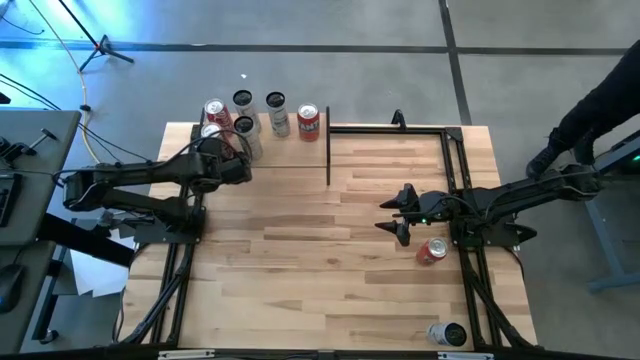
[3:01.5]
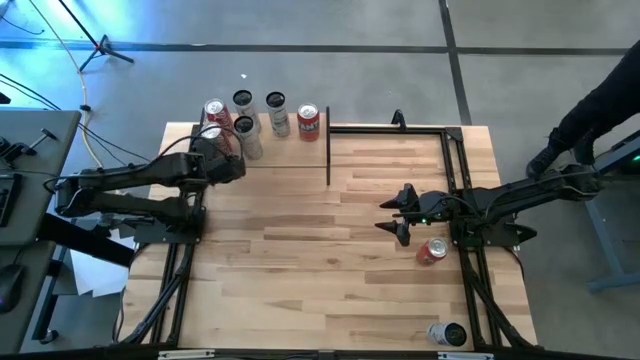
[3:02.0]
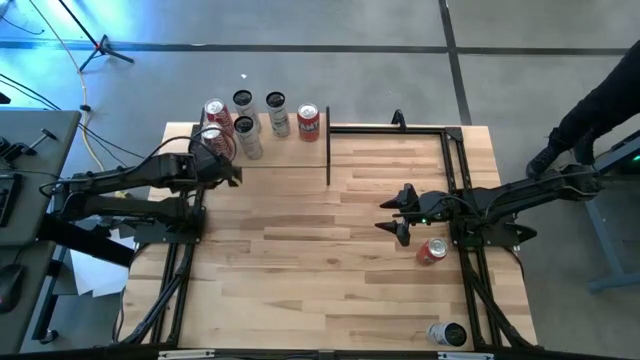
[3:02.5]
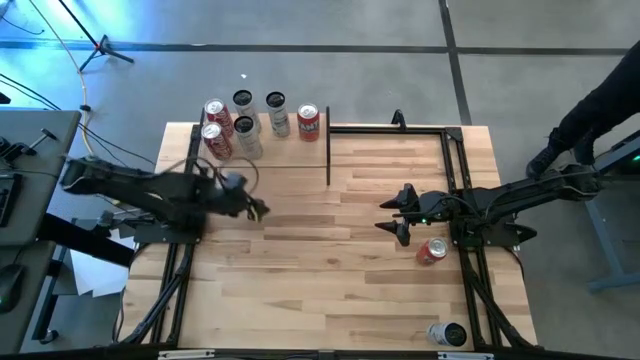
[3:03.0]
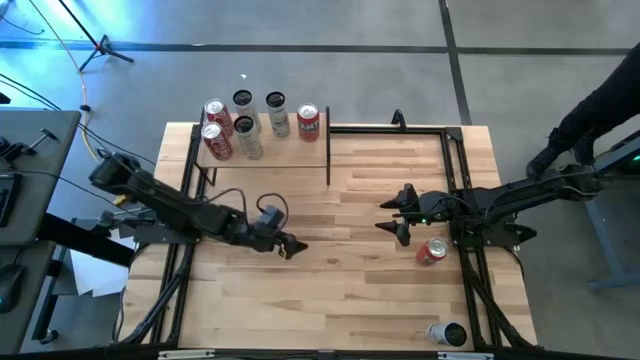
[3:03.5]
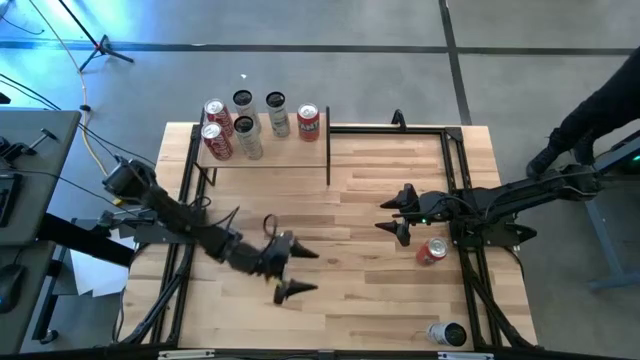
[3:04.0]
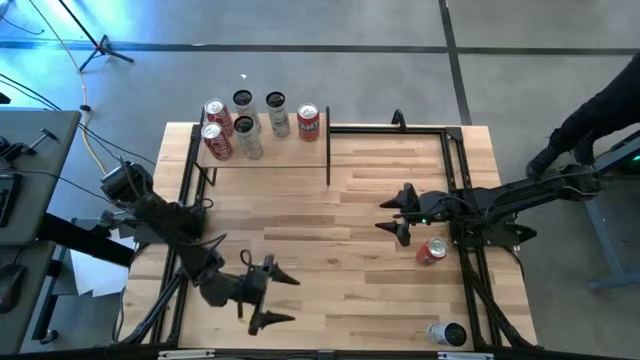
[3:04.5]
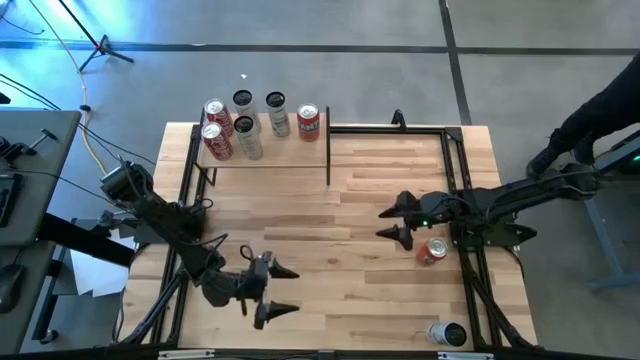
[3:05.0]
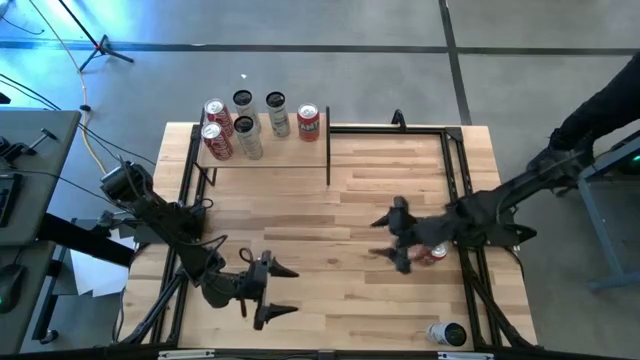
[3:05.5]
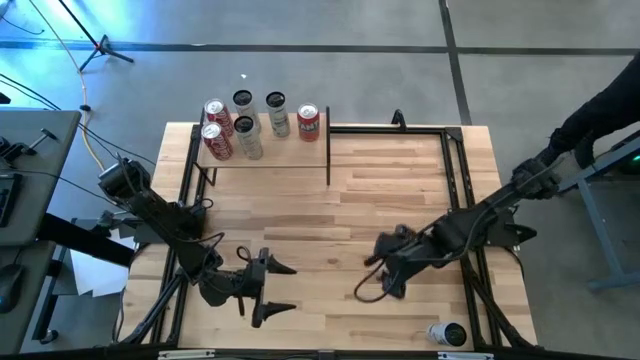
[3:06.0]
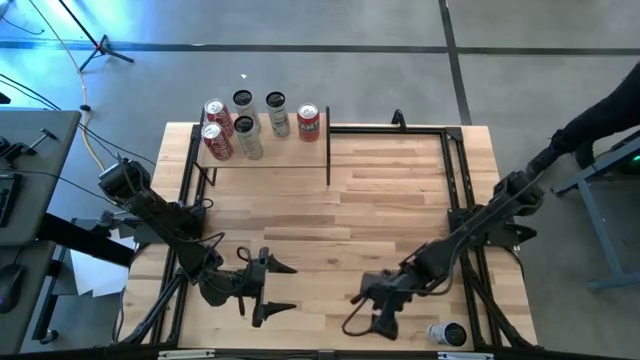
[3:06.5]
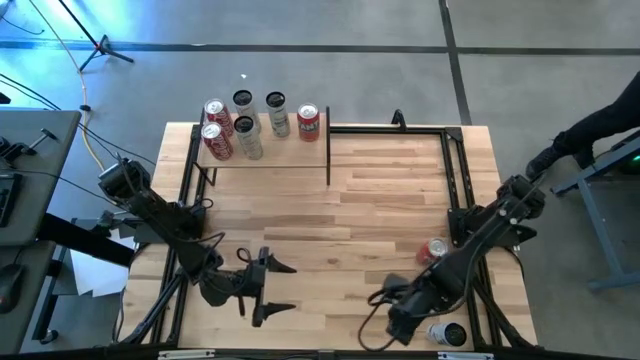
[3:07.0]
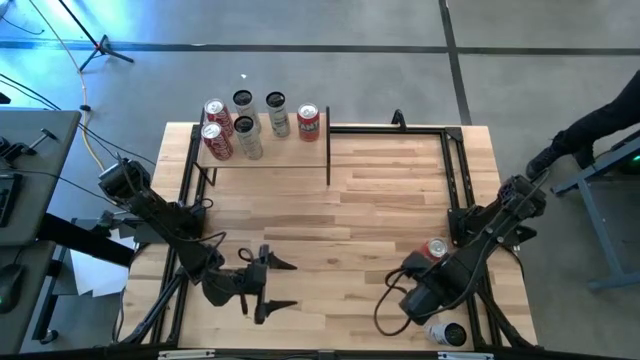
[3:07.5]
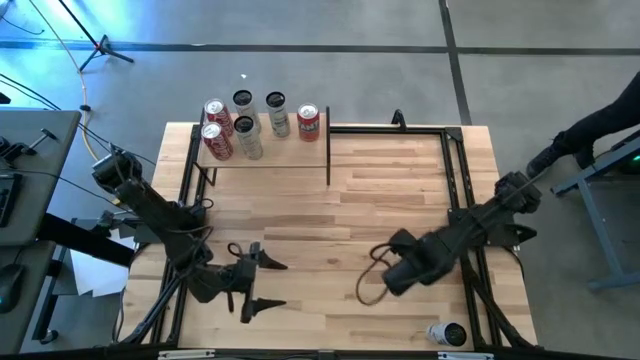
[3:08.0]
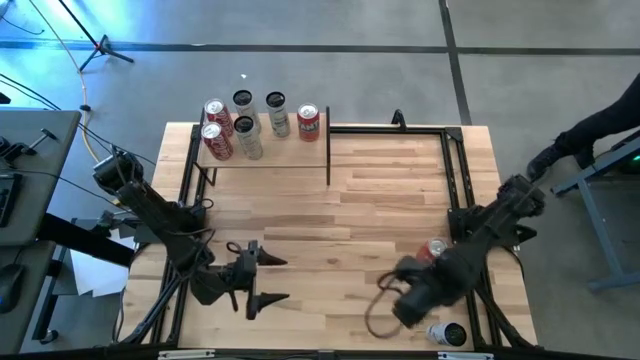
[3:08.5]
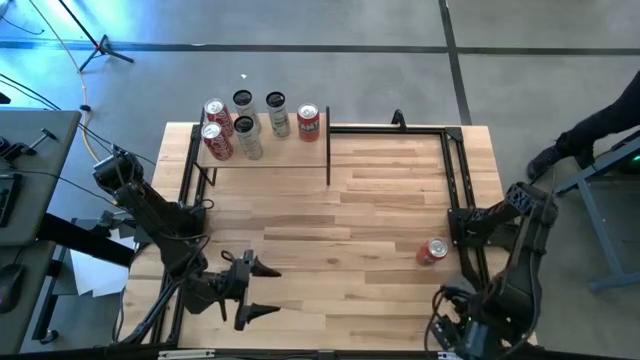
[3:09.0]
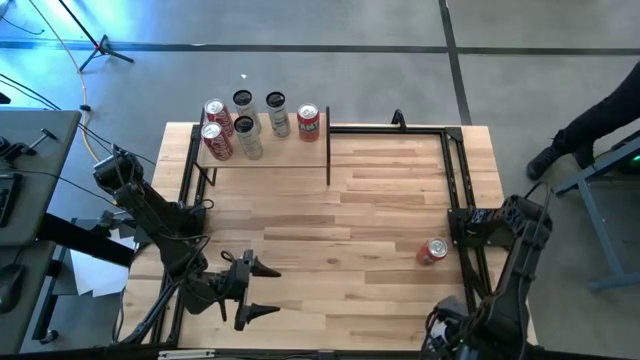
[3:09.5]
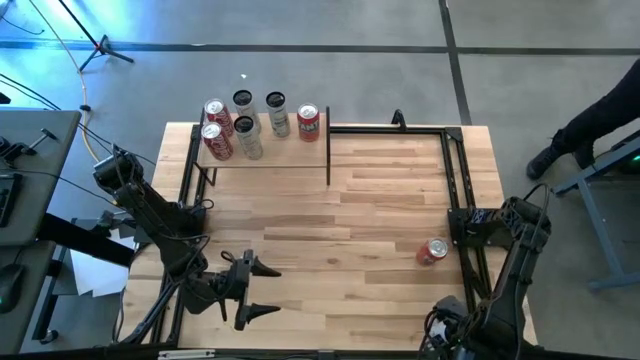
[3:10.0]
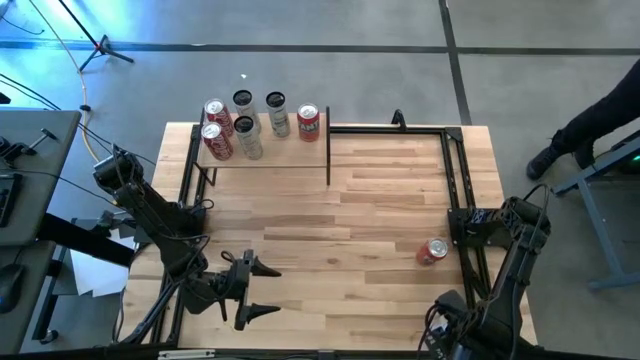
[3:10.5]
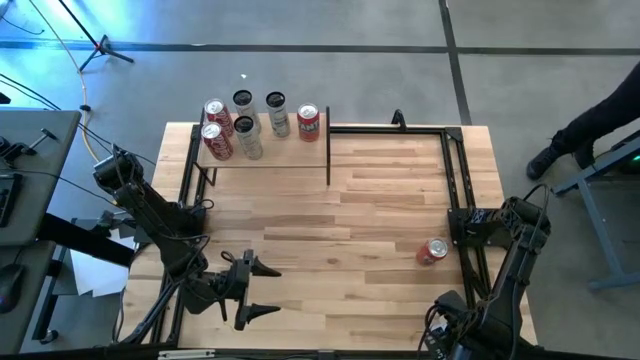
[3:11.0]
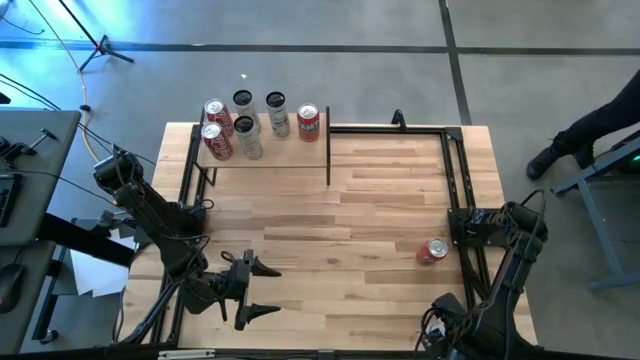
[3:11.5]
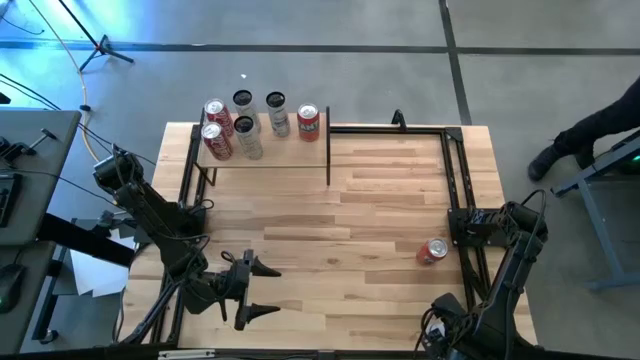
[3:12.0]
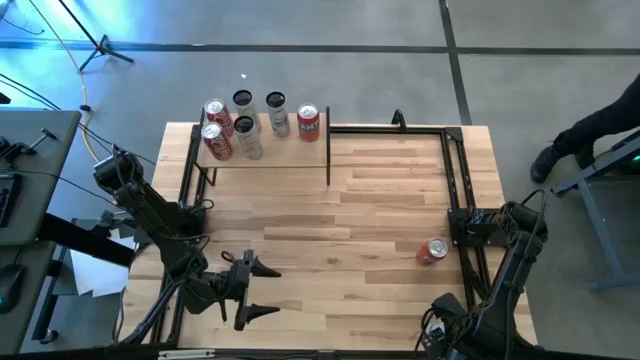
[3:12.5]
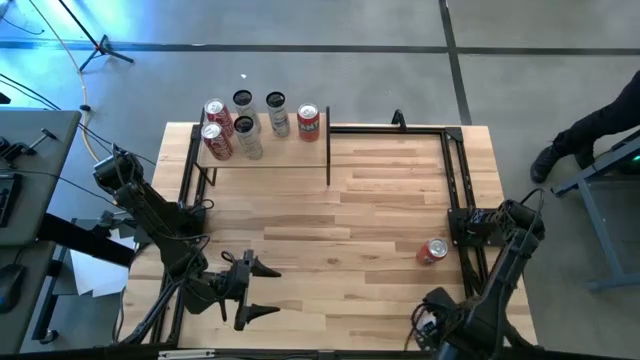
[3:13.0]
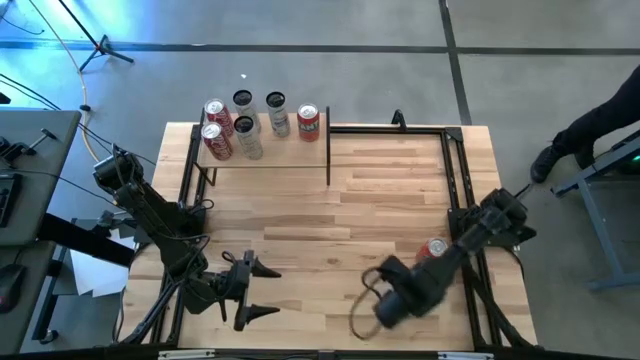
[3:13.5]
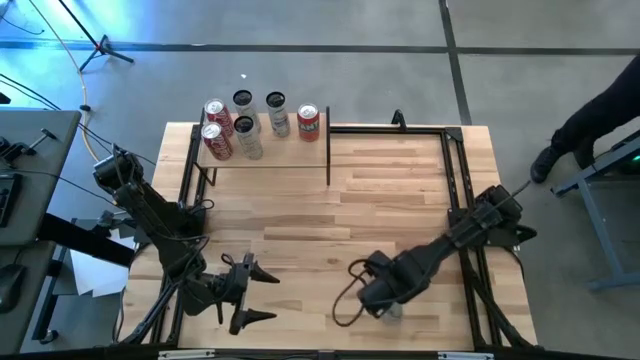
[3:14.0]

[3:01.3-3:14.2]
Task: Place canned beverage on shelf
Put the blue soda can on the shelf aligned with the other blue soda can

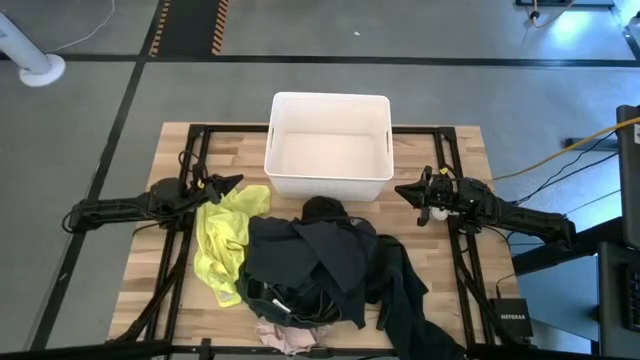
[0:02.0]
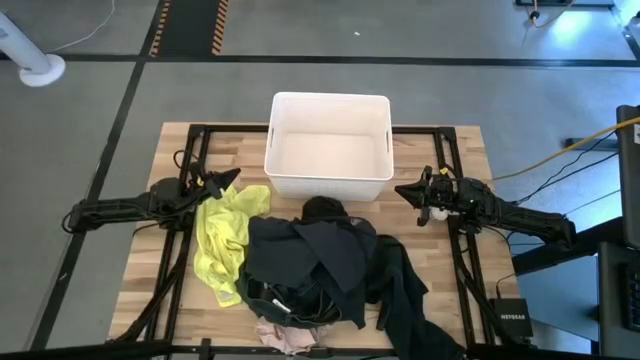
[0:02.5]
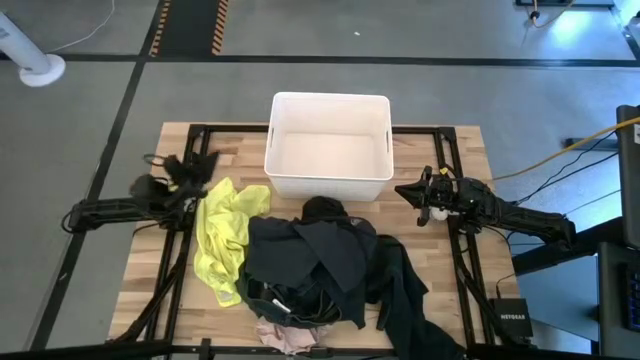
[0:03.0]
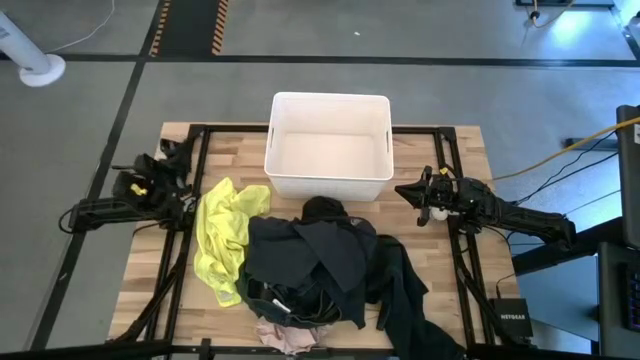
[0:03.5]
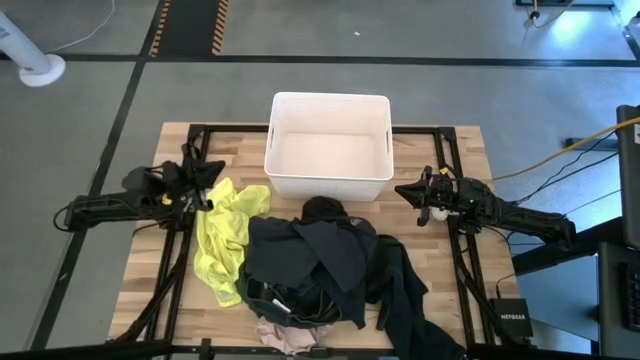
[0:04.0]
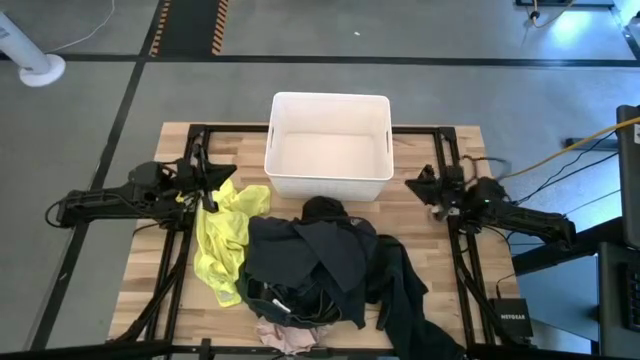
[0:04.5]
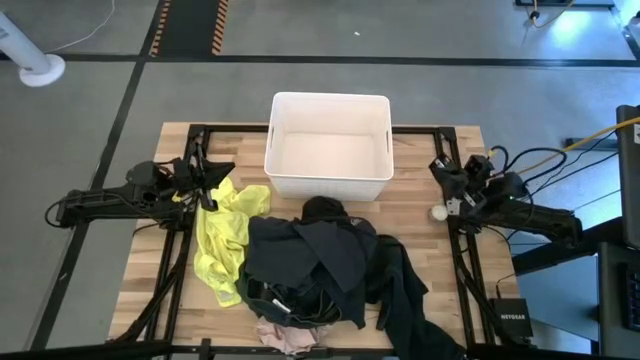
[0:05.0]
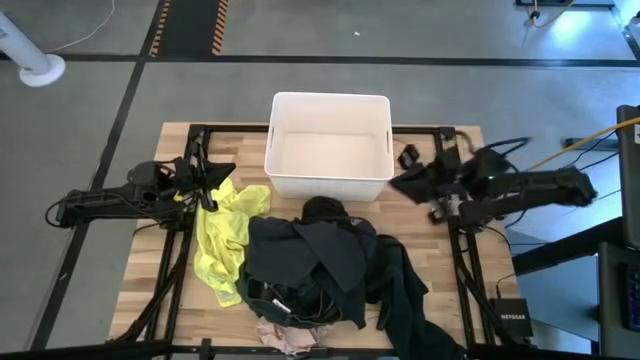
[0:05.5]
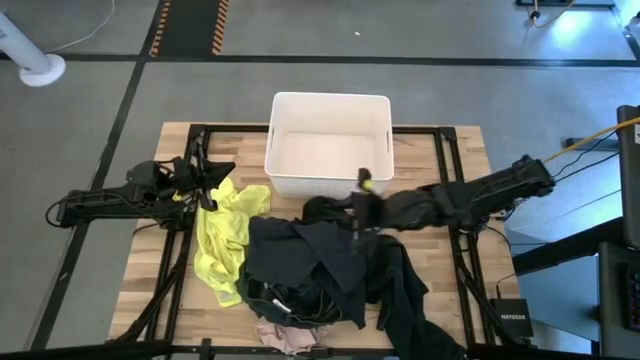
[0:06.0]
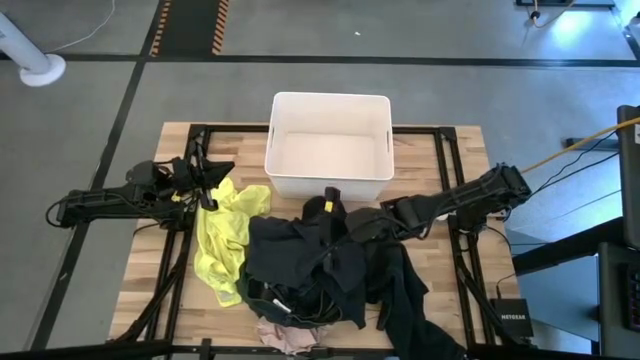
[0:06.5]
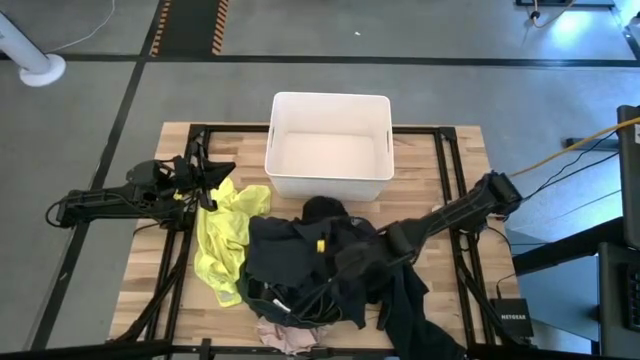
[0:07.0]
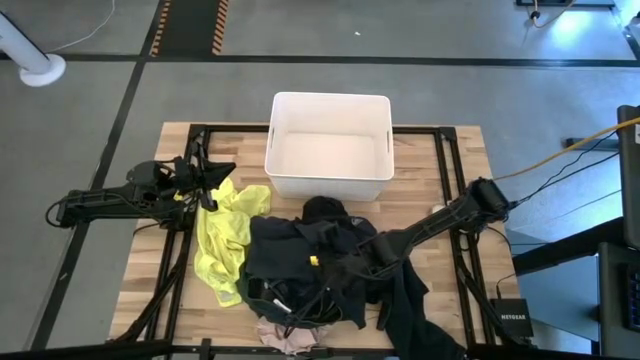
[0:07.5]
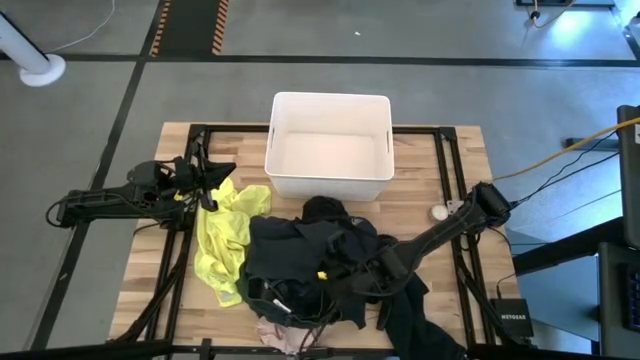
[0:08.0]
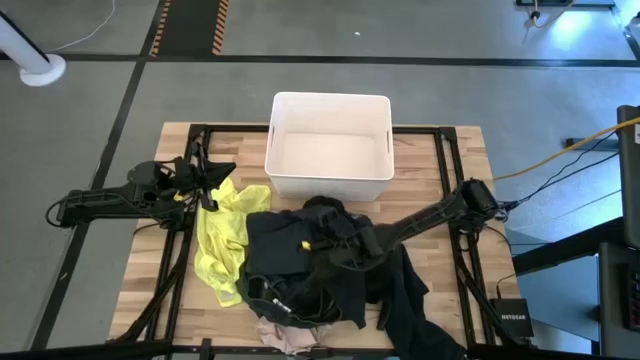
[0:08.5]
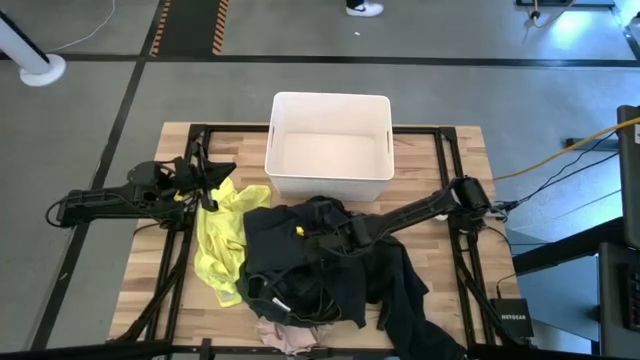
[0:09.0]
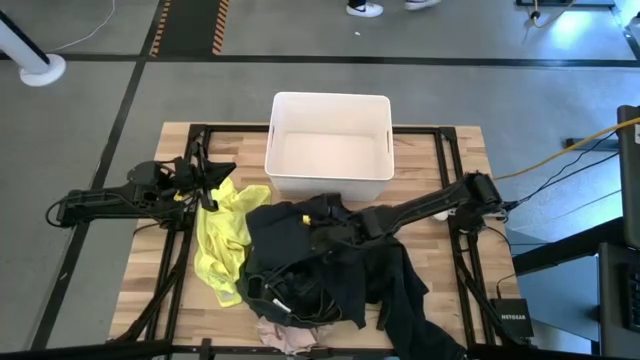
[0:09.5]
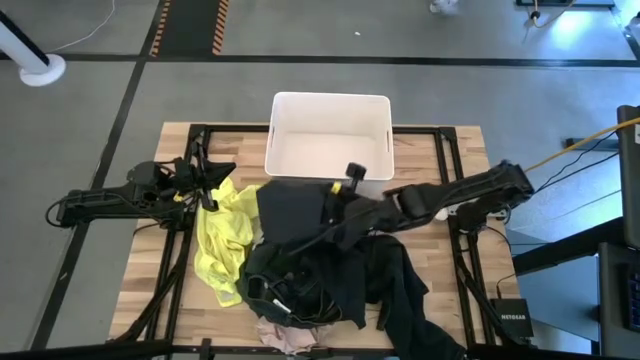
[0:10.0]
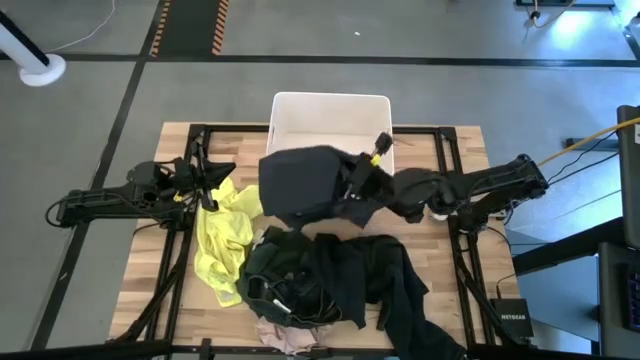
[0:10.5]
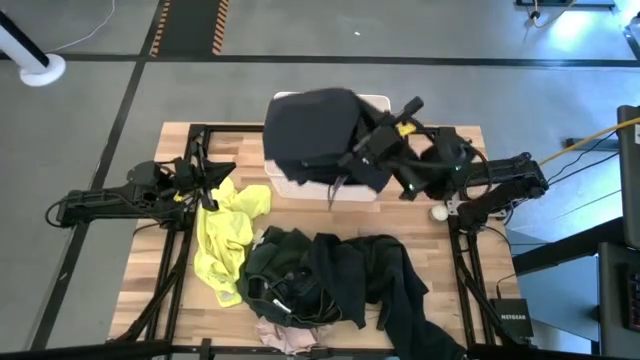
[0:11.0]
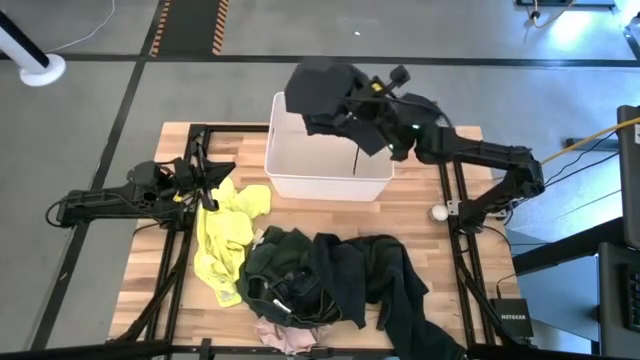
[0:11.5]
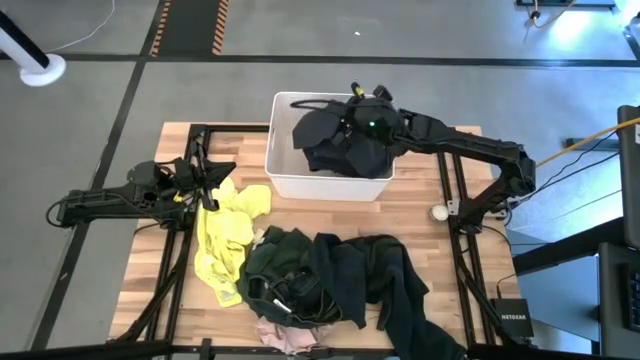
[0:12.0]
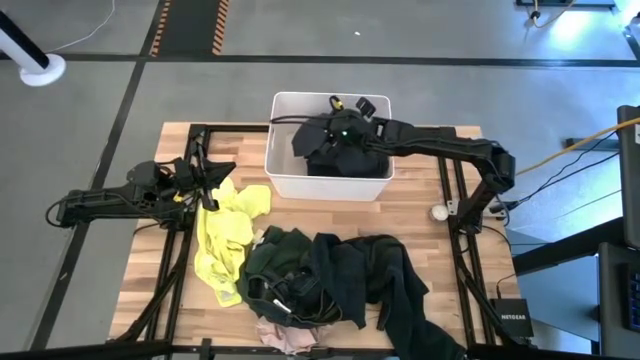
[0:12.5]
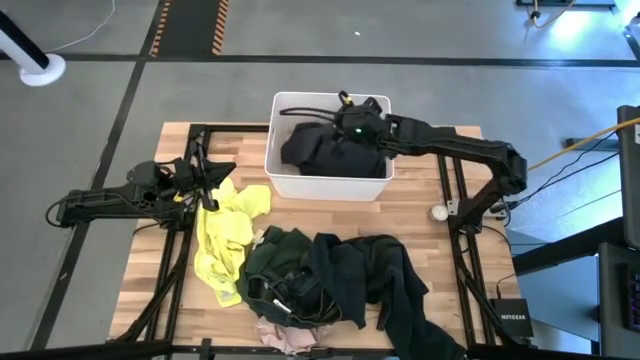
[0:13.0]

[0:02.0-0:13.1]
Task: Sort clothes
Put the gray shorts into the white laundry organizer
